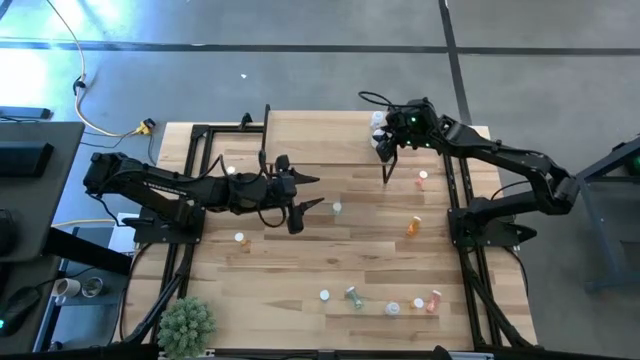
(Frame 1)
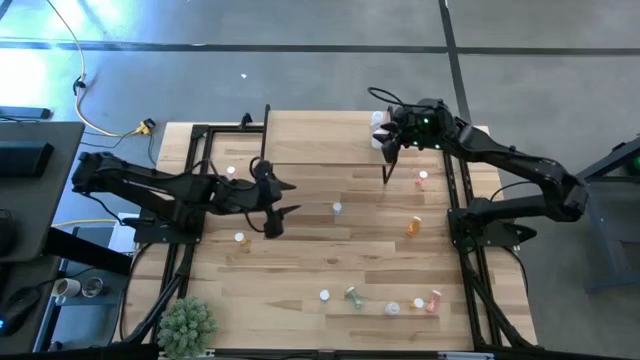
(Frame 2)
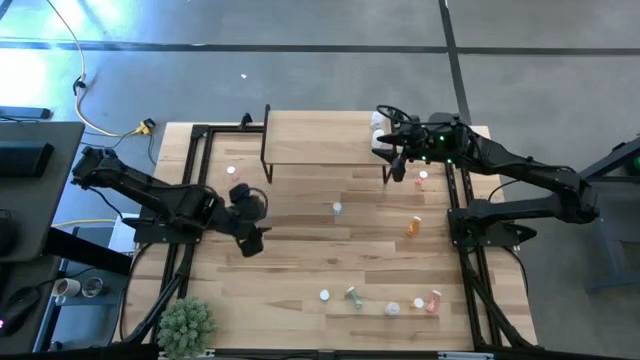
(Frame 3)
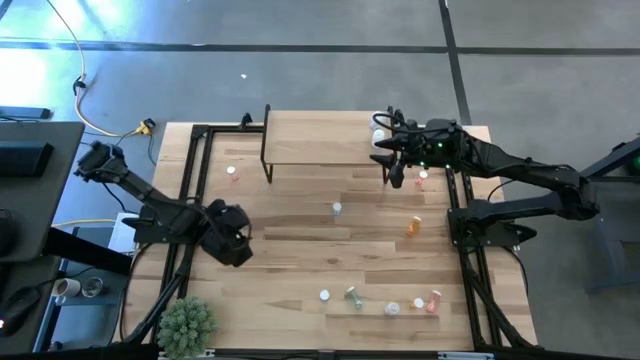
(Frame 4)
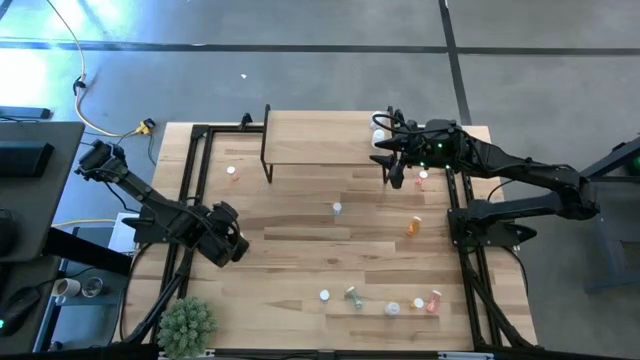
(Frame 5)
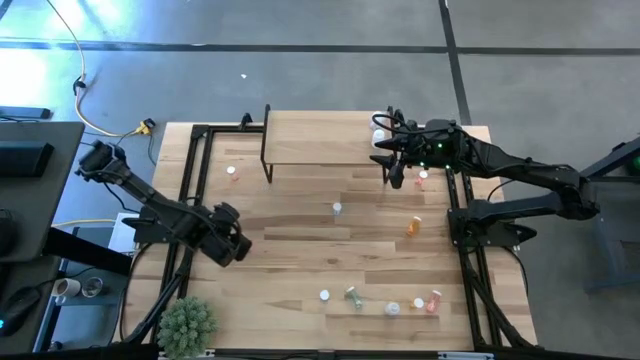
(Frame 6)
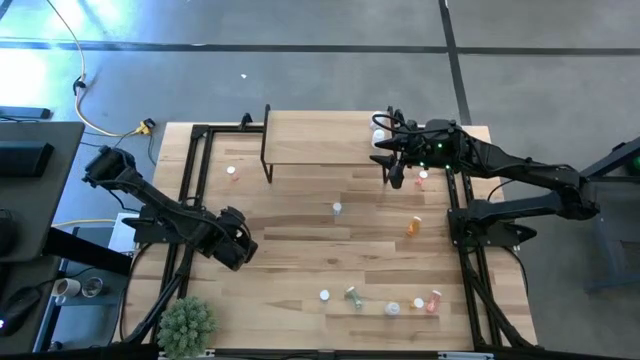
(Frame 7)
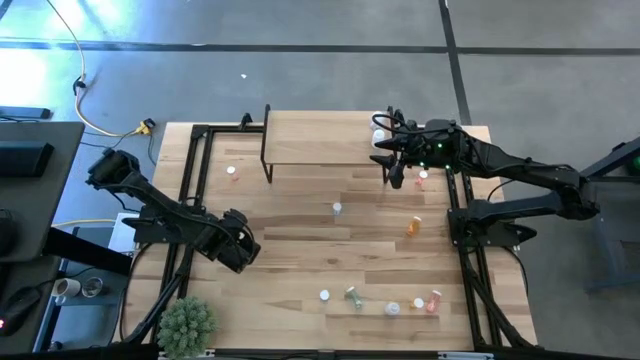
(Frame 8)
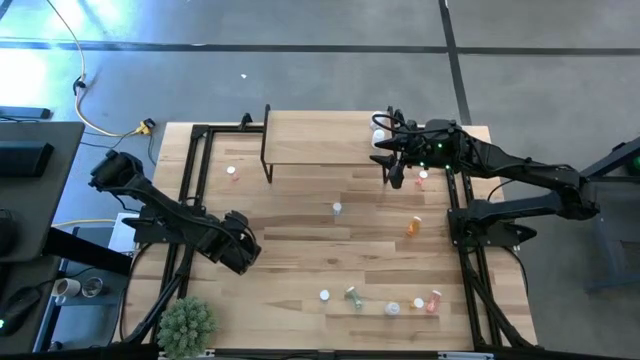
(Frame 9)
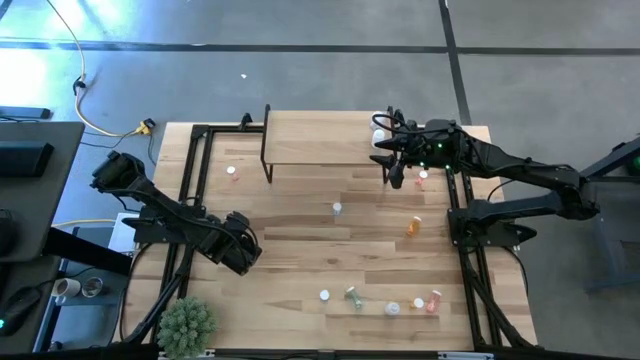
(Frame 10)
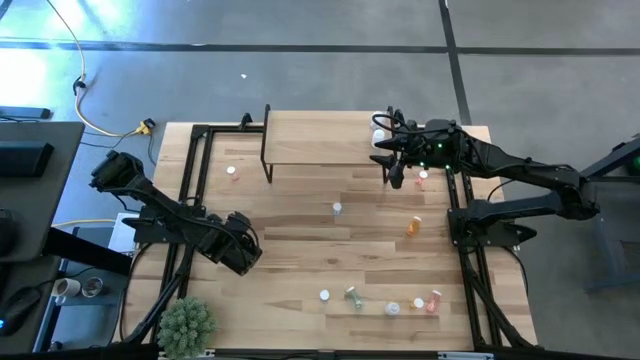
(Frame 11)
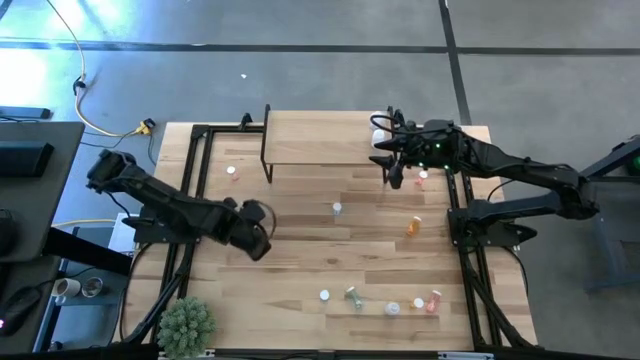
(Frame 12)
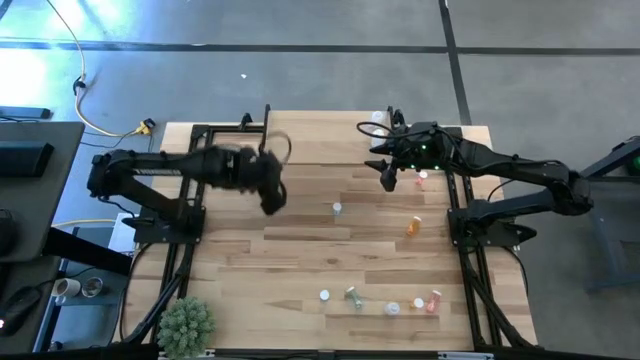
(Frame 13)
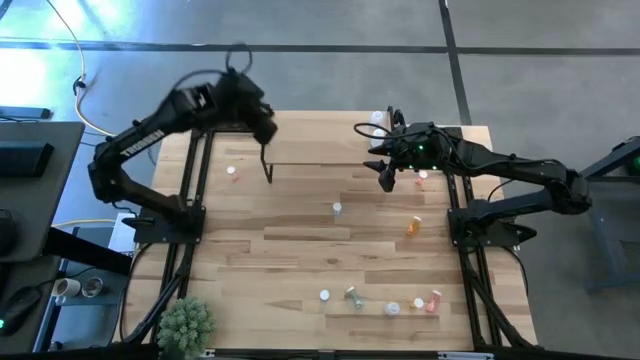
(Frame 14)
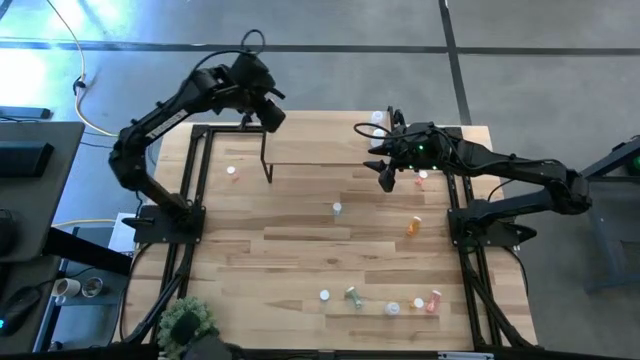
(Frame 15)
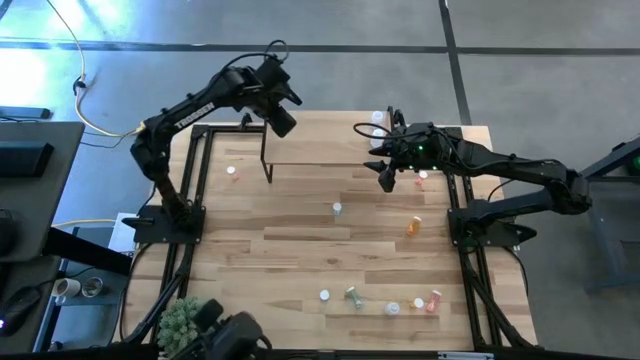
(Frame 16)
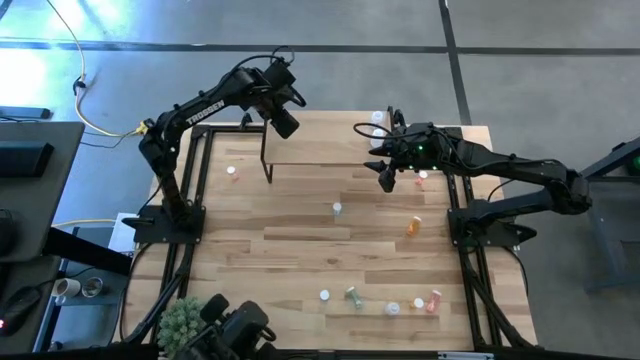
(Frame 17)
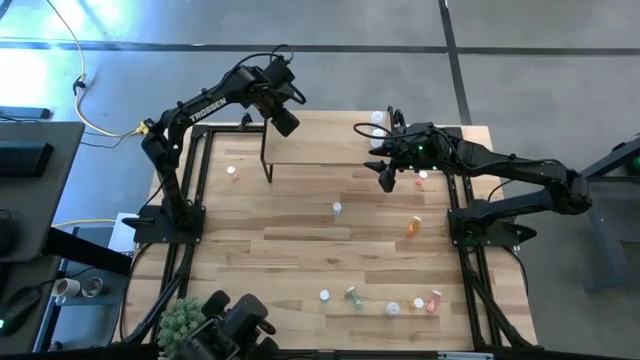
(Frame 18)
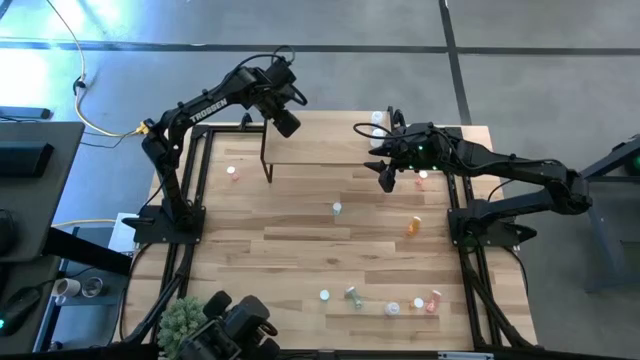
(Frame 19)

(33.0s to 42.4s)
Task: Pick and place medicine bottles onto shelf by color
Put the top left orange pill bottle on the shelf

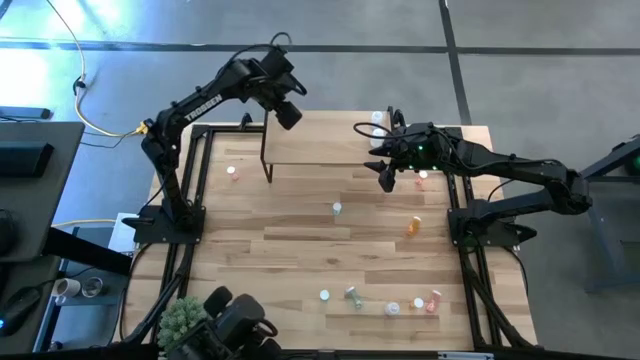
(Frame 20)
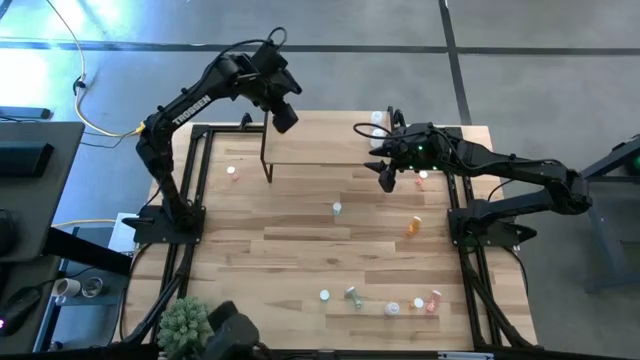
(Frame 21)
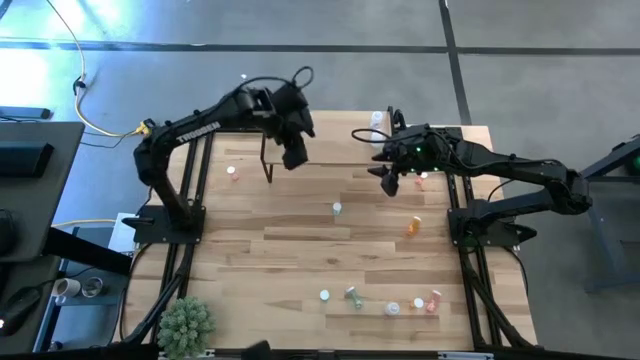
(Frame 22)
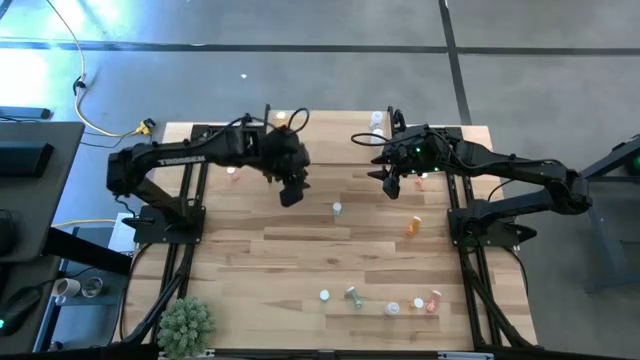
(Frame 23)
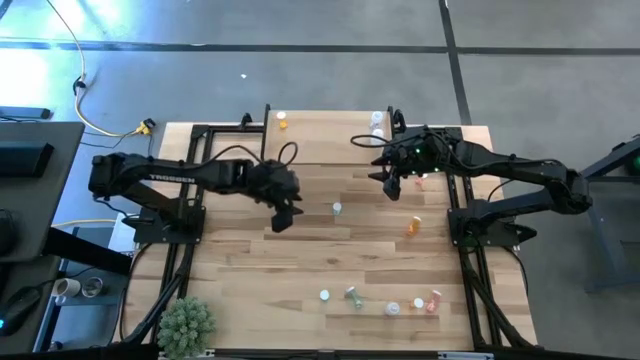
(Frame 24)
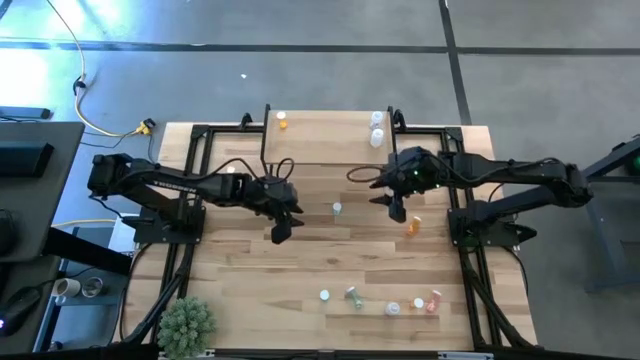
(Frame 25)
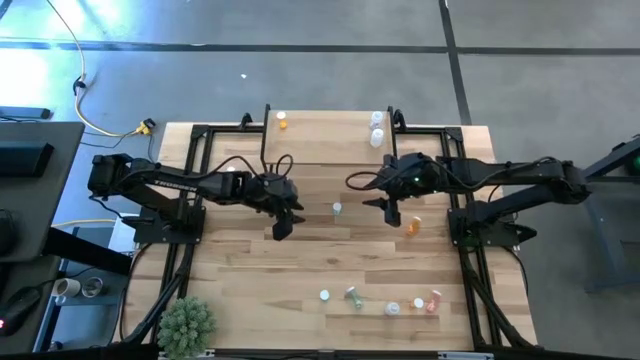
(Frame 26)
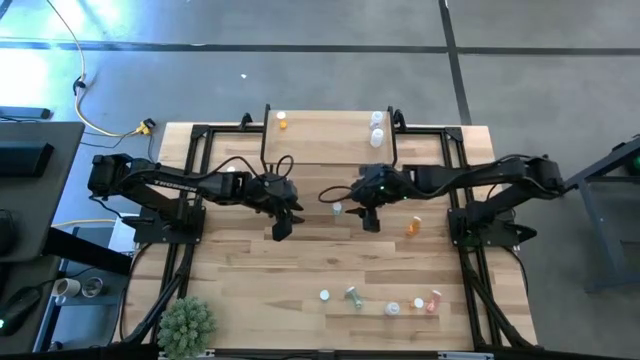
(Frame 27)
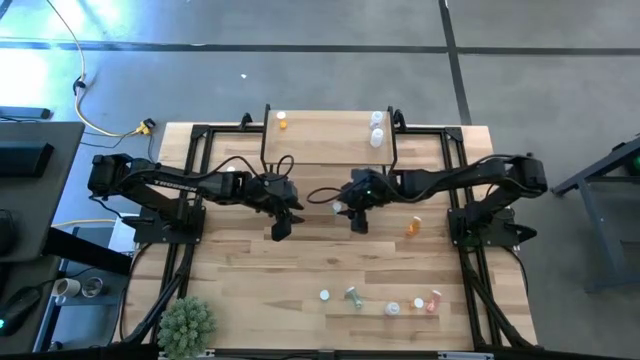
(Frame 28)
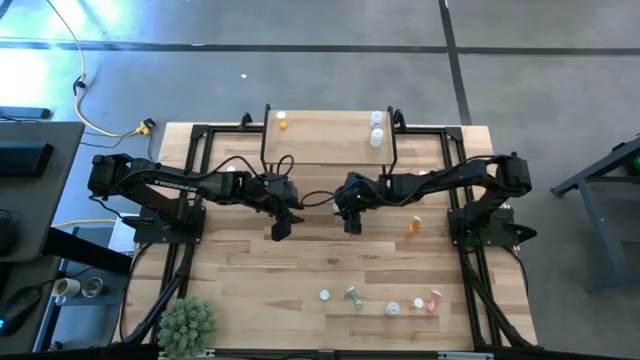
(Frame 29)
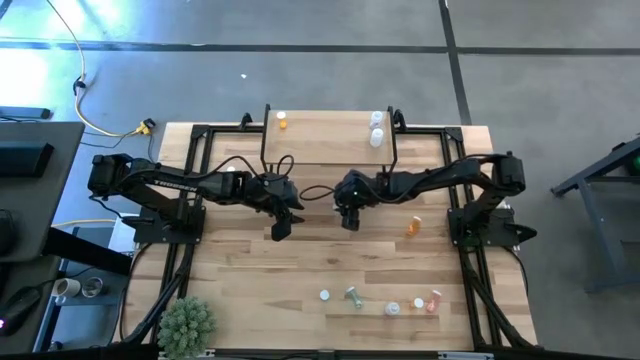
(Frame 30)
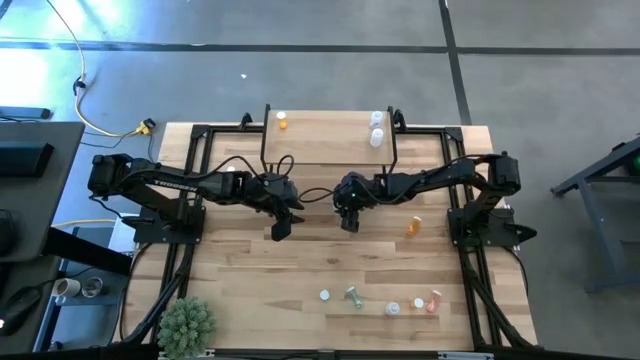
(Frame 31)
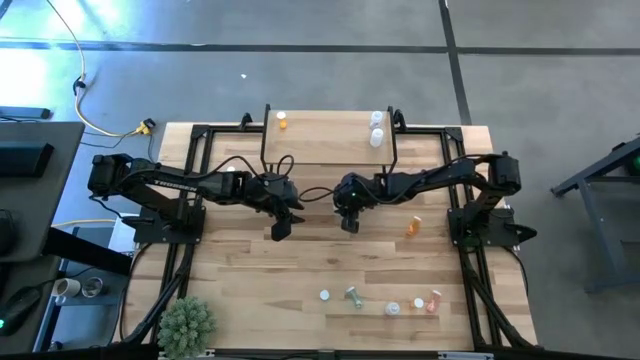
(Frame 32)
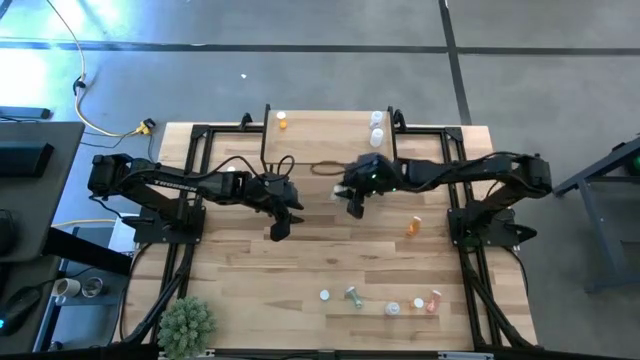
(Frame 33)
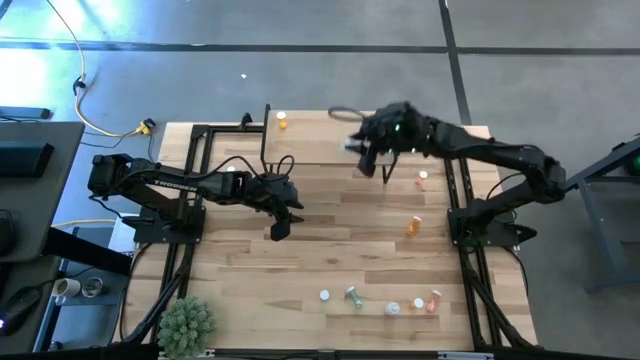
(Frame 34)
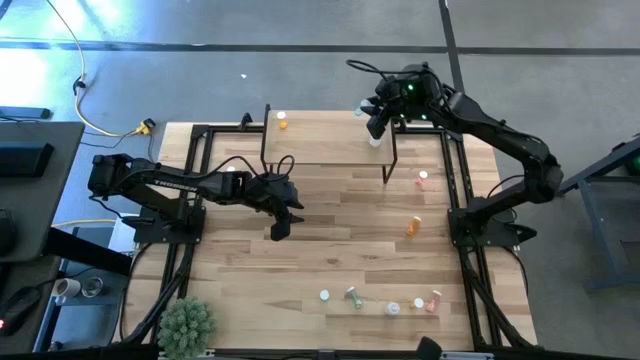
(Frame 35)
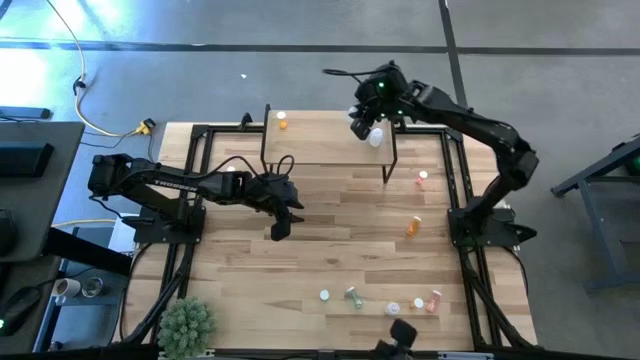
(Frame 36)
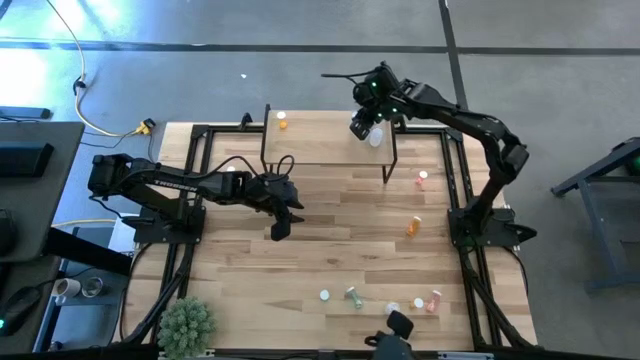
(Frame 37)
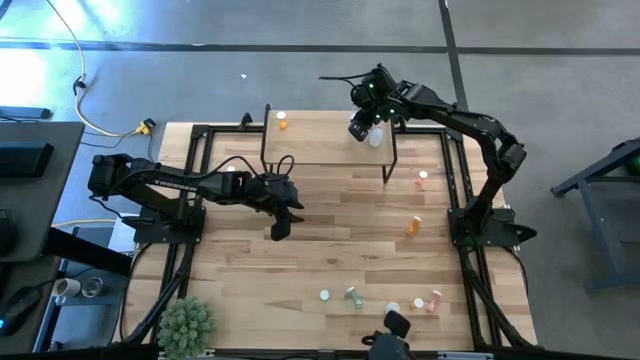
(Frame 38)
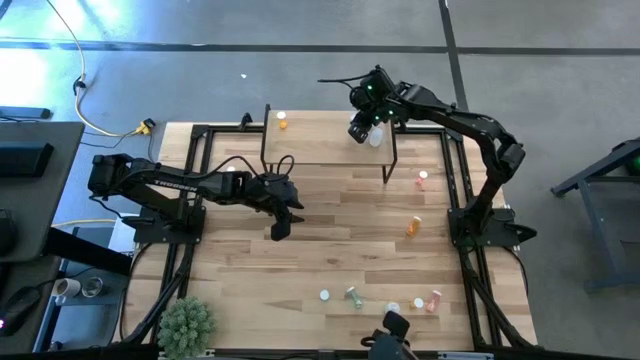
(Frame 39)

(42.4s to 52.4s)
Put the top blue pill bottle on the shelf

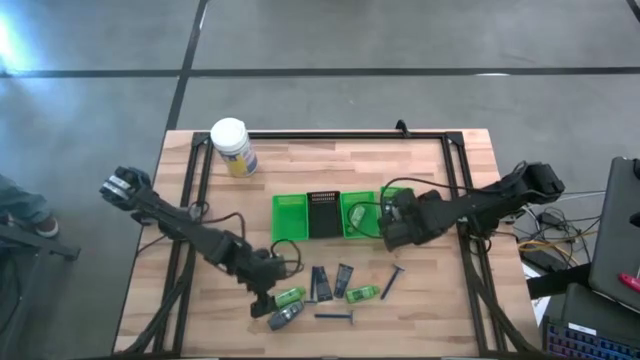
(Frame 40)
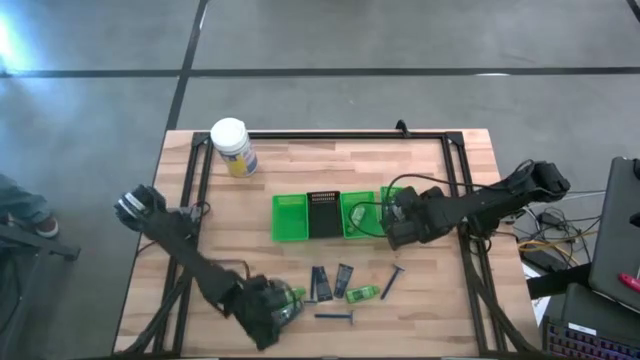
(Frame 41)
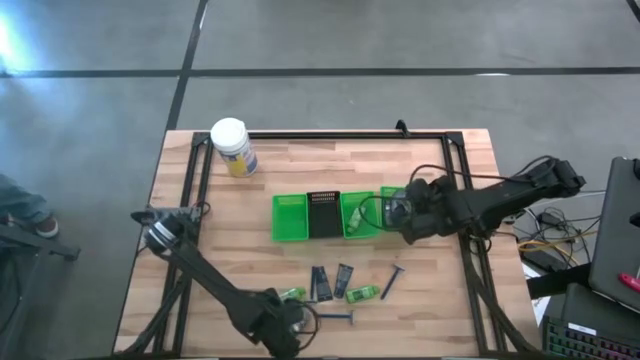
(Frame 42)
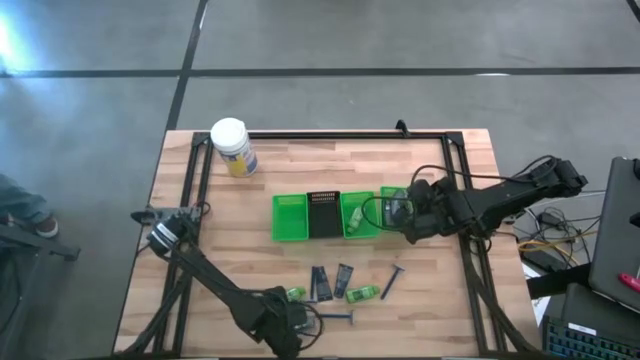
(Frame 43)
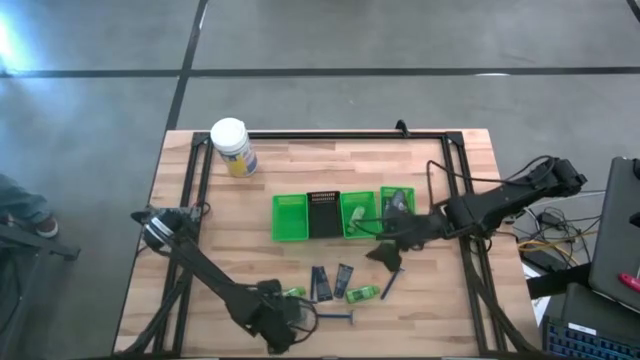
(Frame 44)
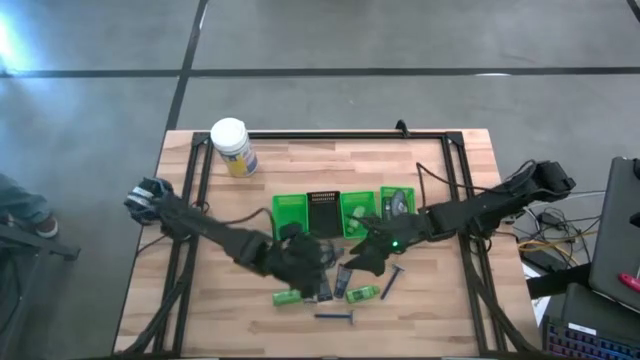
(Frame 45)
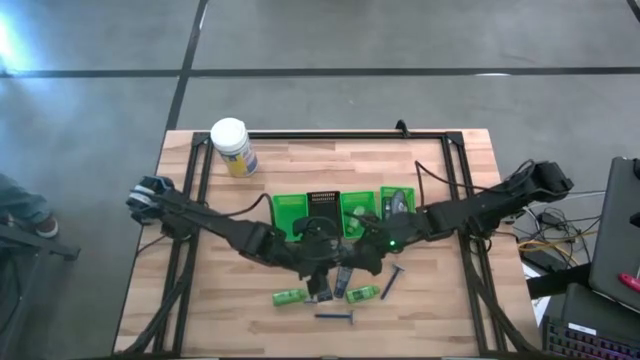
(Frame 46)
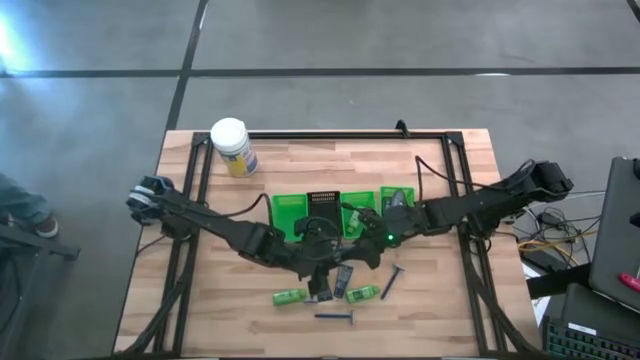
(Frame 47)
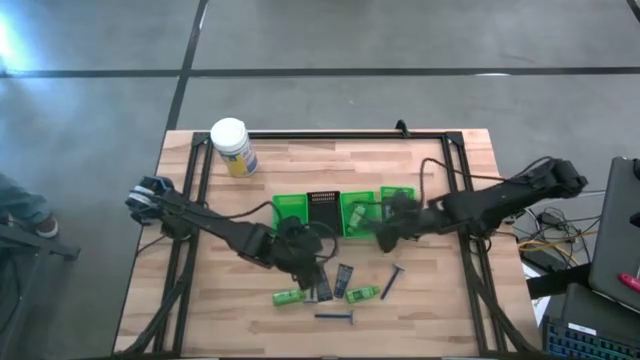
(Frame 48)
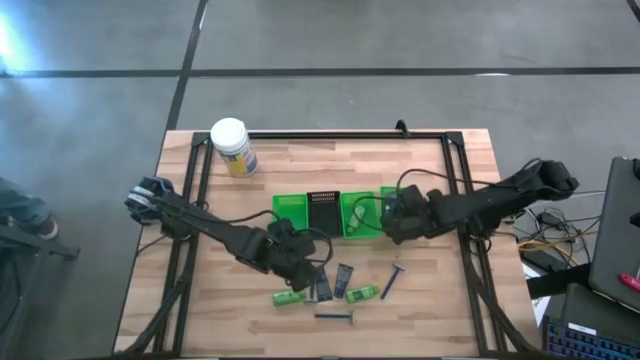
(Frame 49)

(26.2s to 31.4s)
Task: Pick & Place Travel size toiletries
Put the black deodorant into the right green basket
